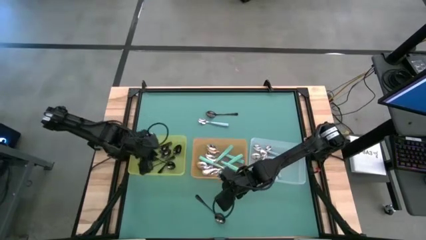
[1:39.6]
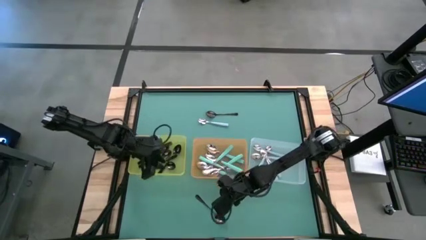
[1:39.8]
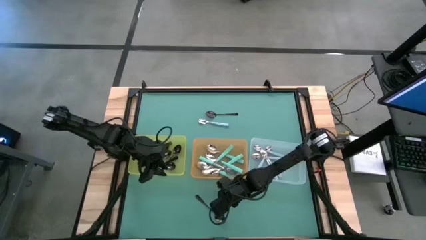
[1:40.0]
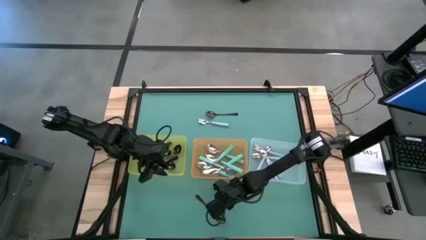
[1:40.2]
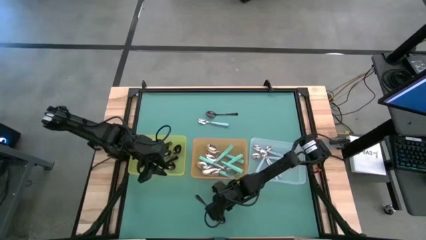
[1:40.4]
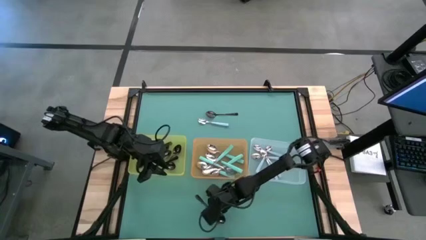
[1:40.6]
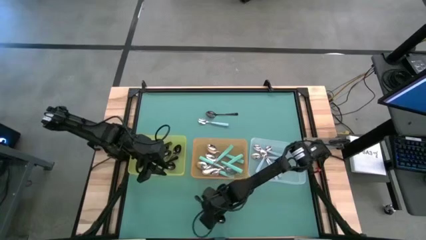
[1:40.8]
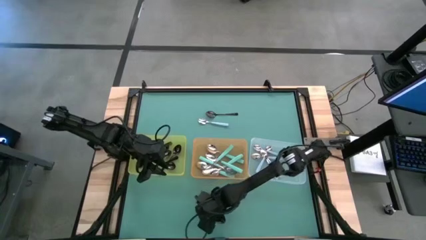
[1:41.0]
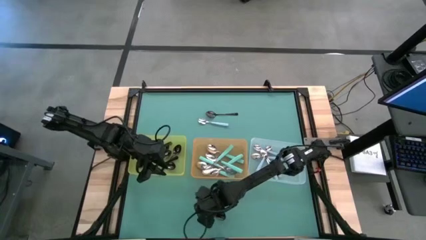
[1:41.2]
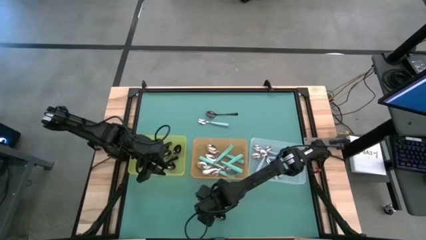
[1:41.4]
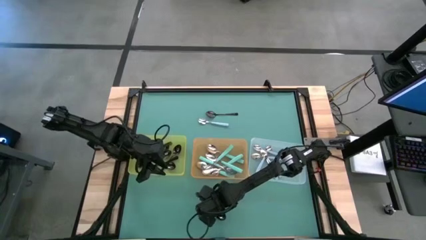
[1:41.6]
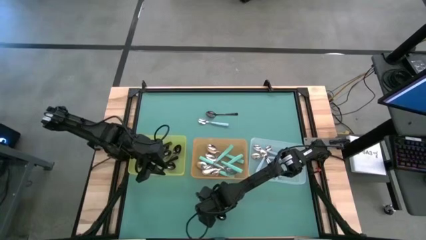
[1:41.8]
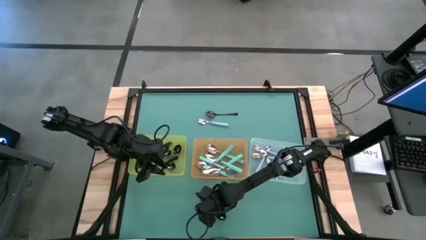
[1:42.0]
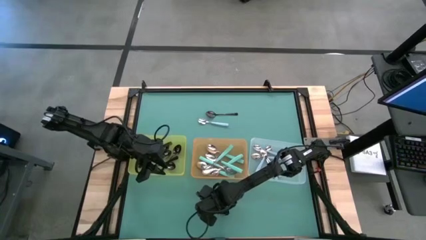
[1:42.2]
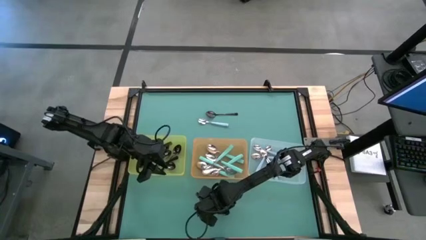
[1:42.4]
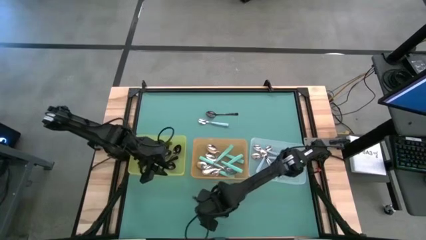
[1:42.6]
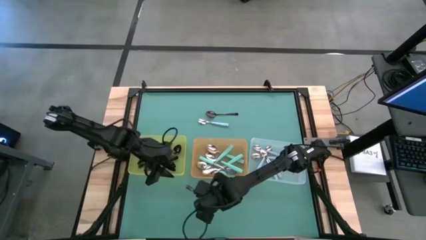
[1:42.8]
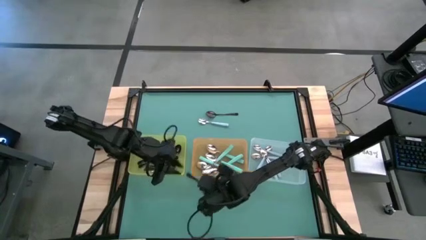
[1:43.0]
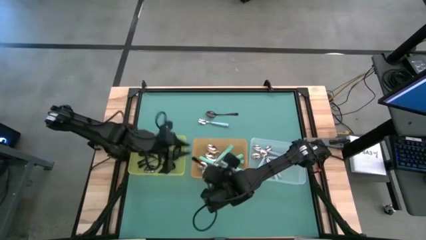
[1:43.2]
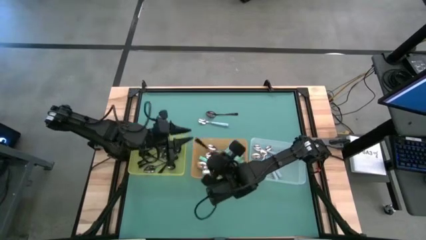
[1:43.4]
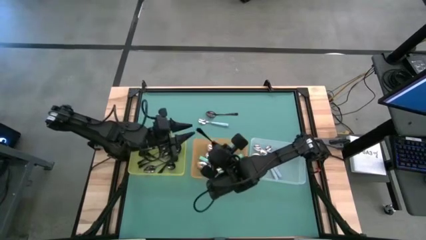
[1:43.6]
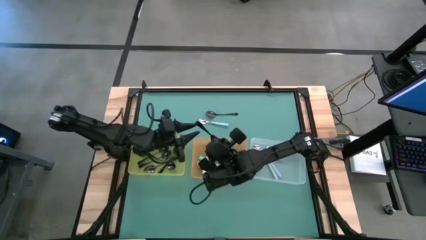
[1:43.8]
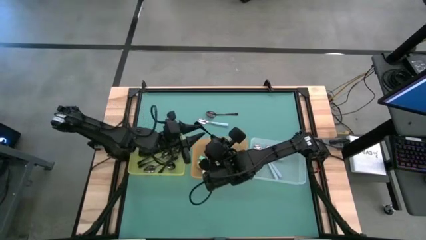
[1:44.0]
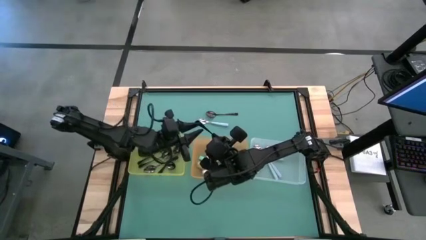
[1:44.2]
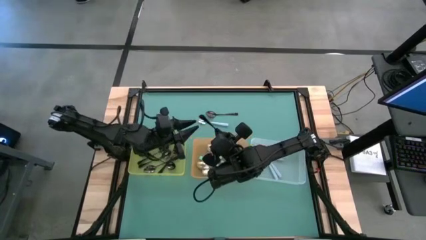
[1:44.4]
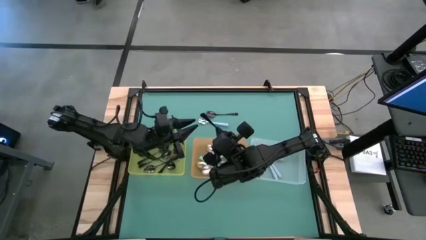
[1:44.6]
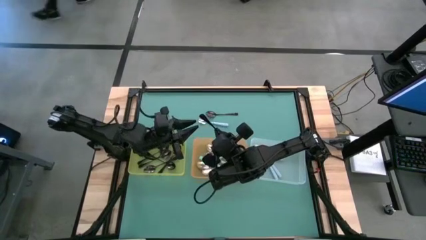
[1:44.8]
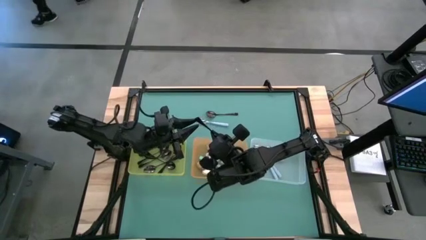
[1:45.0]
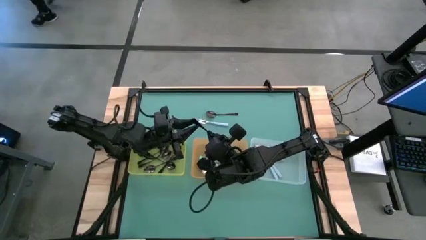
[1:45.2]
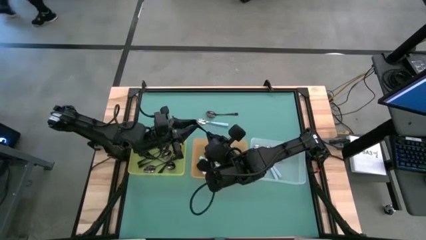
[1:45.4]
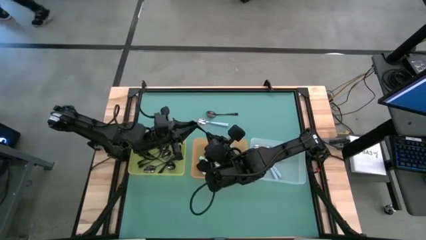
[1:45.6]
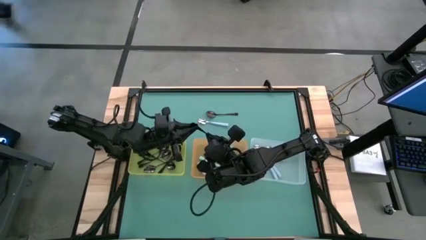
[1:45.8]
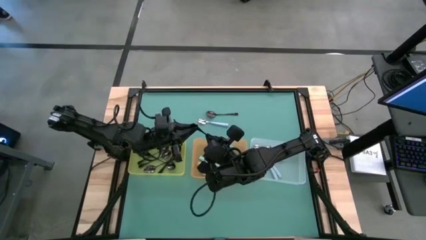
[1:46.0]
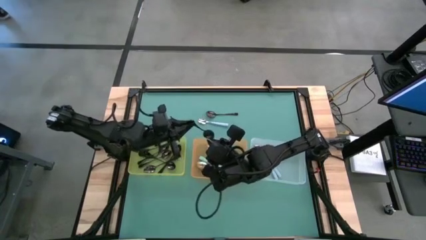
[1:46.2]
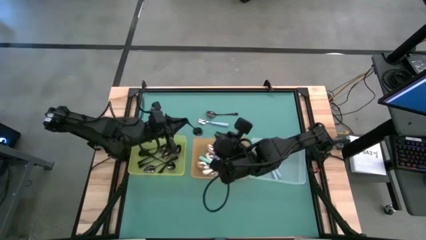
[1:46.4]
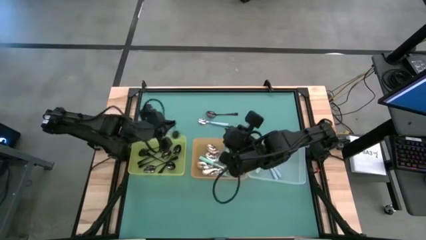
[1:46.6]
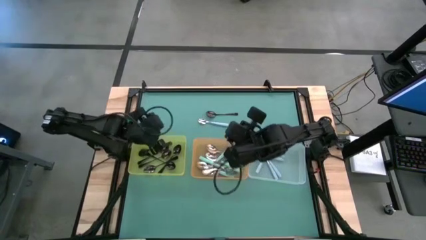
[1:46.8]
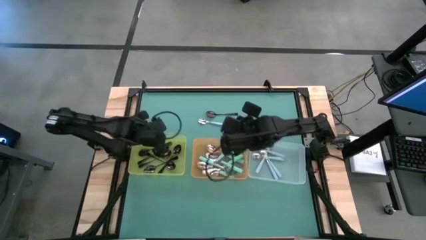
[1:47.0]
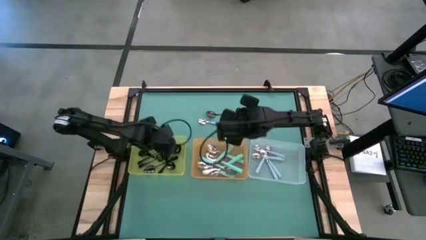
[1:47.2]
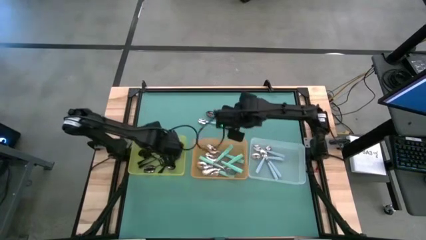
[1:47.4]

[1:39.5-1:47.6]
Task: Sort silverware by color (type)
Put the black spoon into the yellow bin

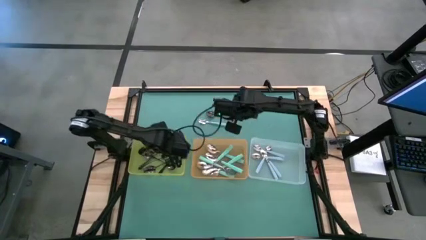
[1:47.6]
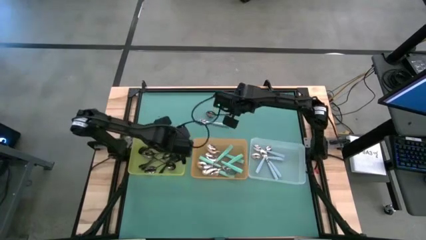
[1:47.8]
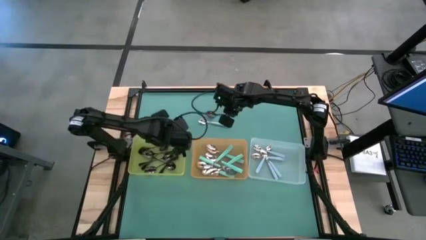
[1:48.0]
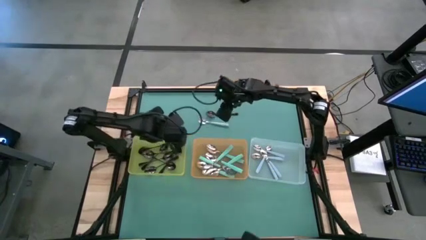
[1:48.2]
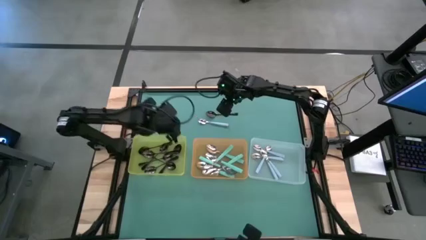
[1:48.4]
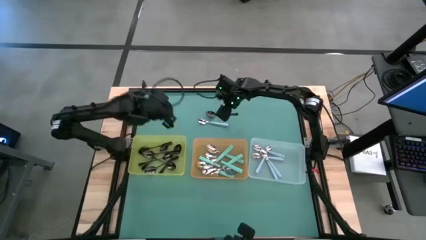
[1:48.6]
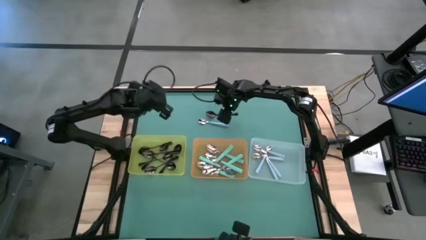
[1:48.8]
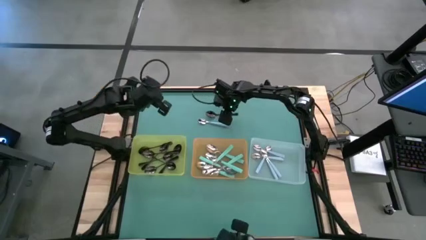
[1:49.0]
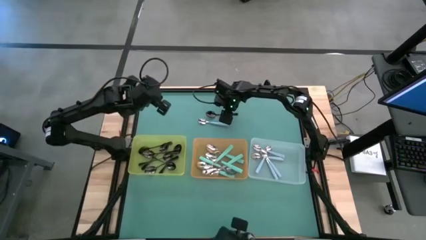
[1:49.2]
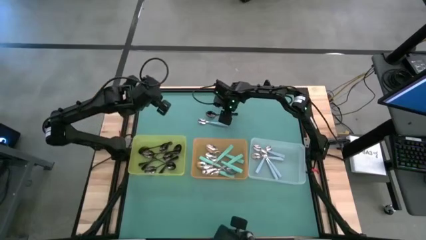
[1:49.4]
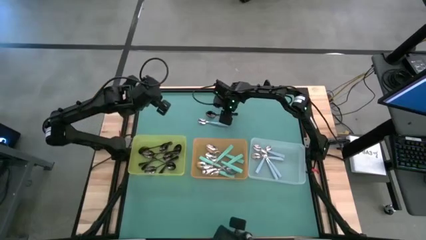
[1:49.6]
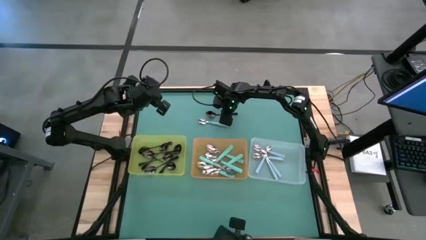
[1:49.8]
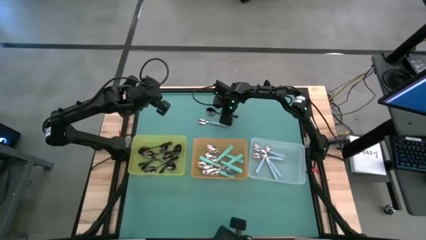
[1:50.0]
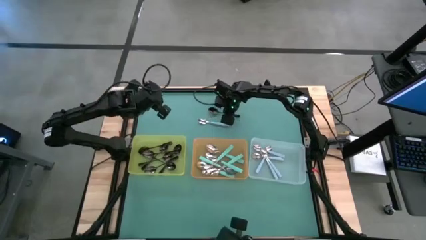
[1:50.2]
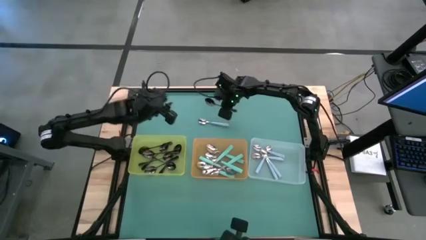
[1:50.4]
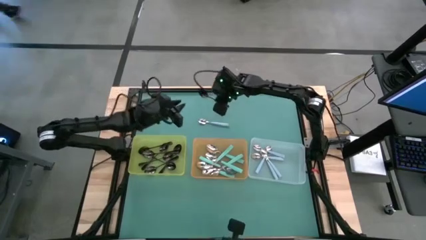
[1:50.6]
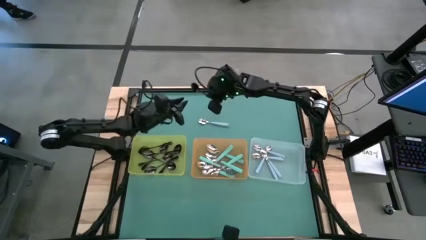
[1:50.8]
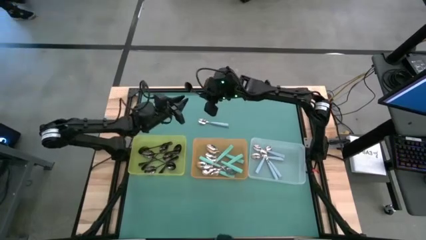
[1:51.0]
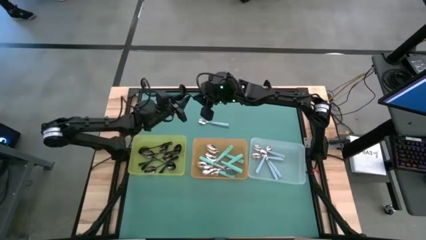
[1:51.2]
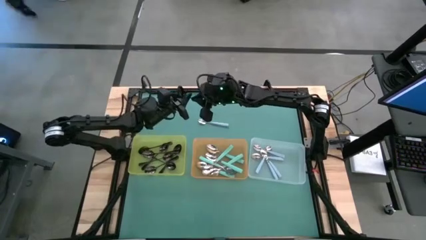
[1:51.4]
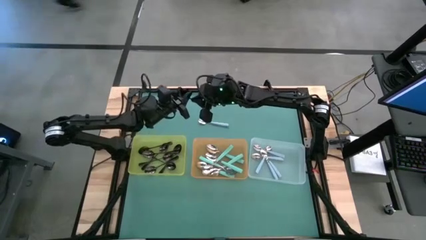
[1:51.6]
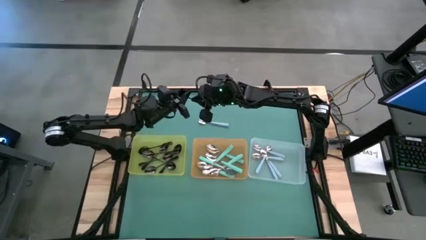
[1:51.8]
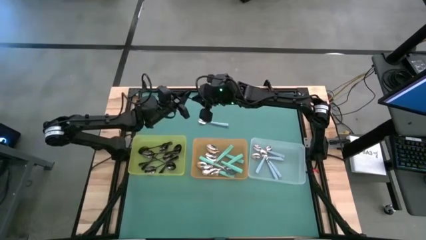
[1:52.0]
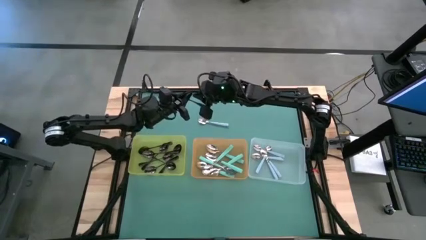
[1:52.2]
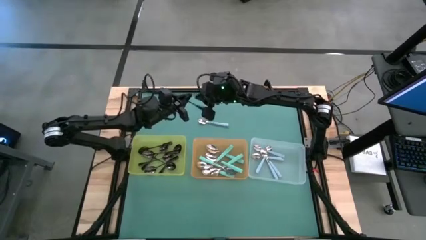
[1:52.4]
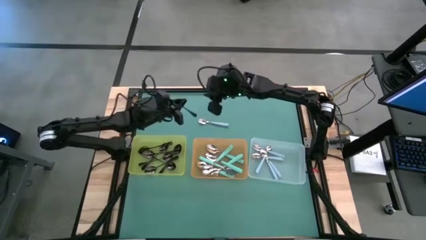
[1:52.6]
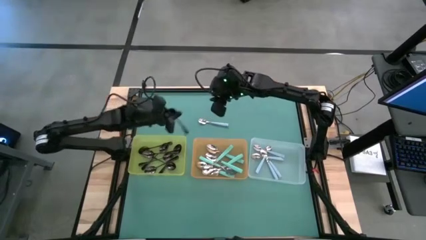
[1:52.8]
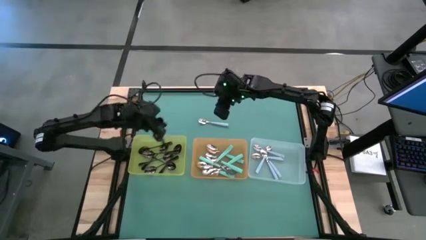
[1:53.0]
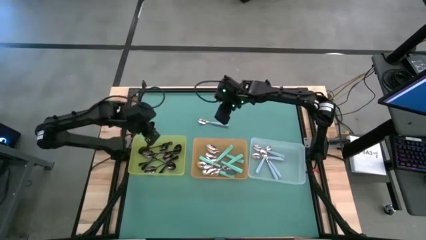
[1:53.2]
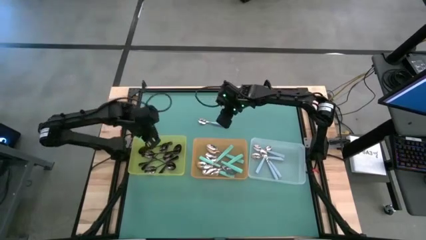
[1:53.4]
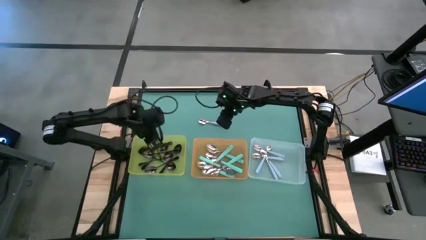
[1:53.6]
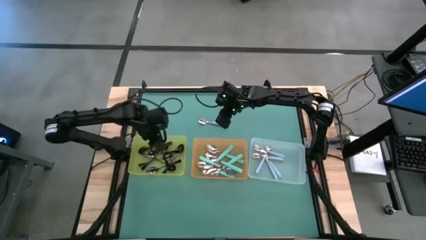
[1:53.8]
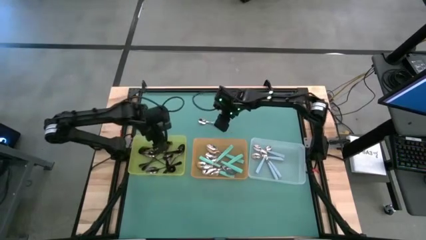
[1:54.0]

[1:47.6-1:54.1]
Put the black spoon into the yellow bin

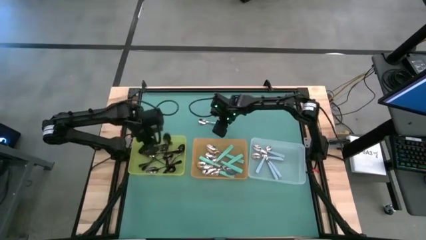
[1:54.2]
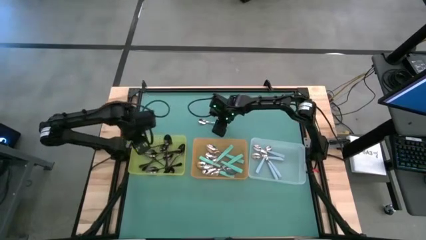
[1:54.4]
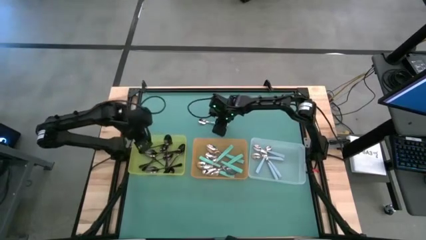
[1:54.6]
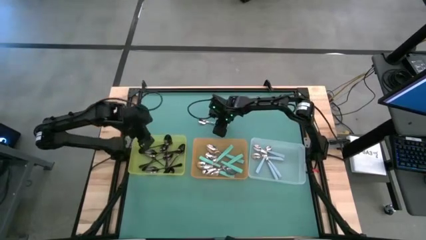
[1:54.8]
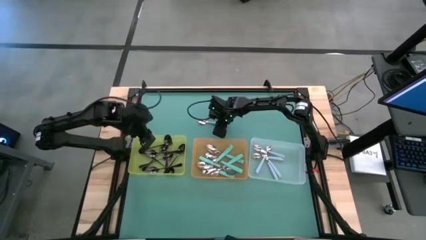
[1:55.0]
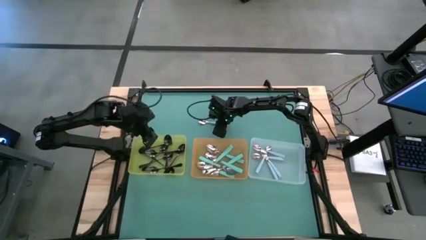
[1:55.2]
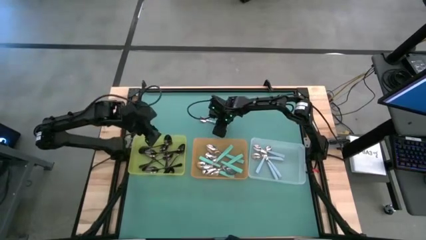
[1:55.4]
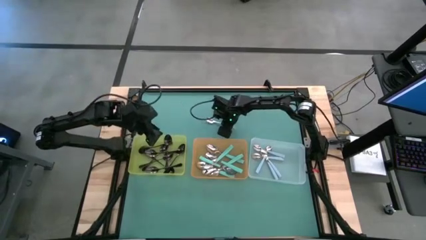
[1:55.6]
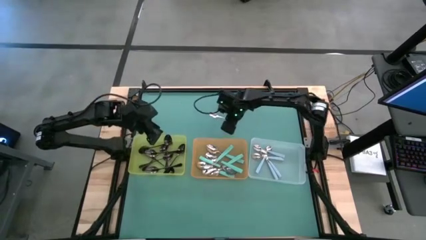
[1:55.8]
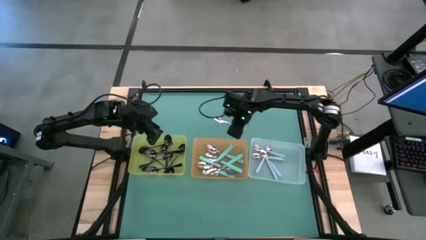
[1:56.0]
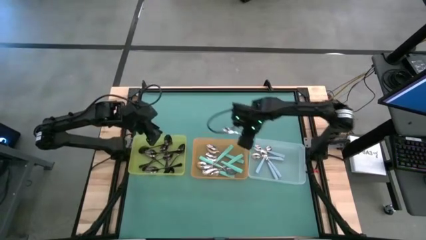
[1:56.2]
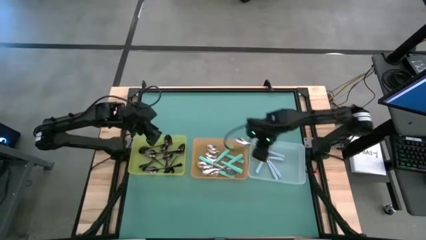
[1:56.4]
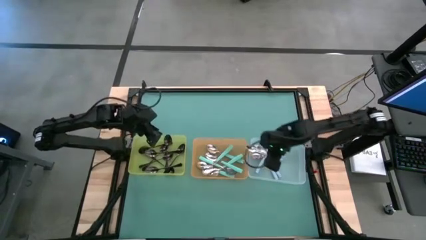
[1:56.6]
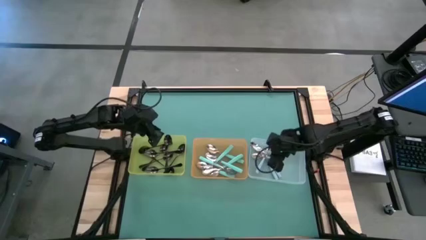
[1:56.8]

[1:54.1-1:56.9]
Put the blue spoon into the white bin
